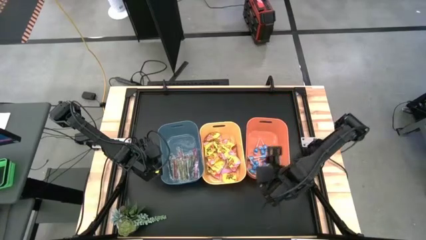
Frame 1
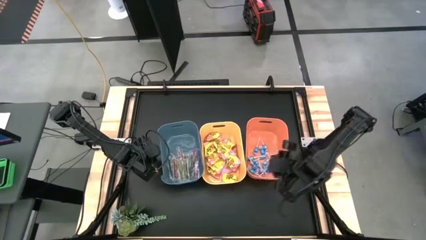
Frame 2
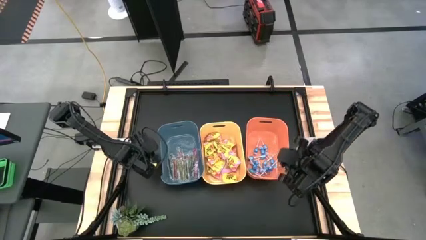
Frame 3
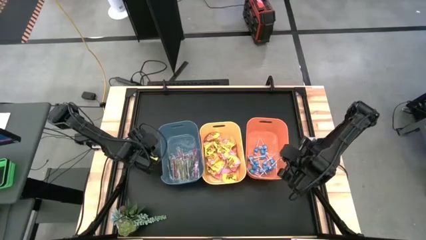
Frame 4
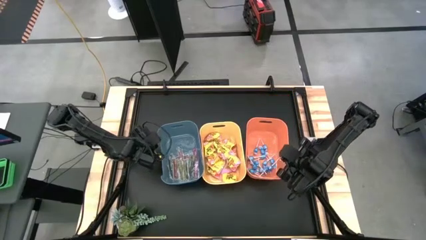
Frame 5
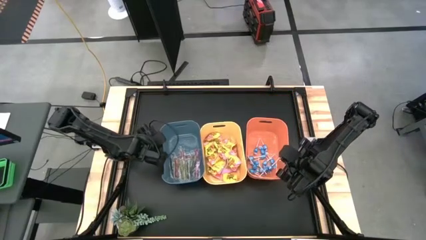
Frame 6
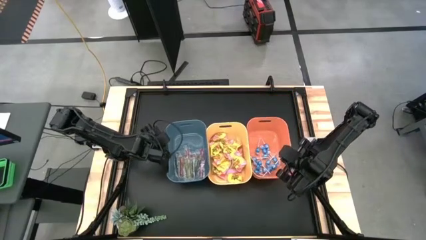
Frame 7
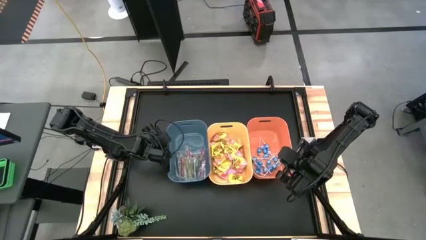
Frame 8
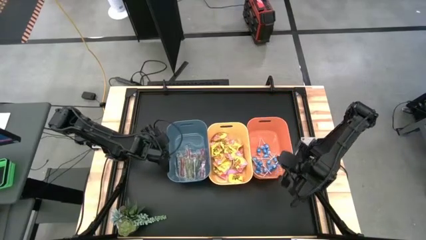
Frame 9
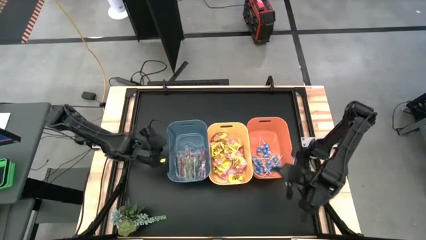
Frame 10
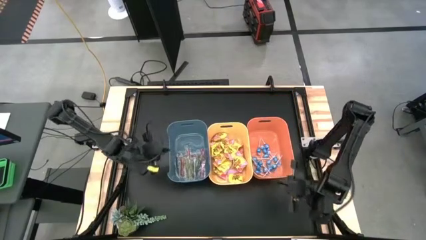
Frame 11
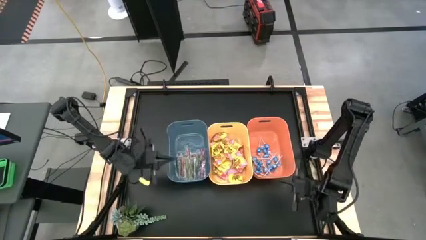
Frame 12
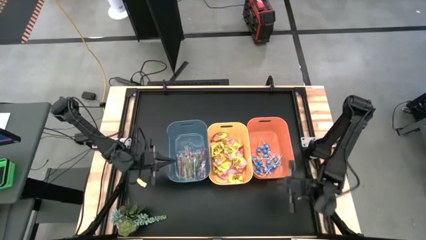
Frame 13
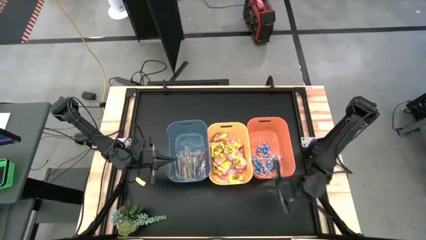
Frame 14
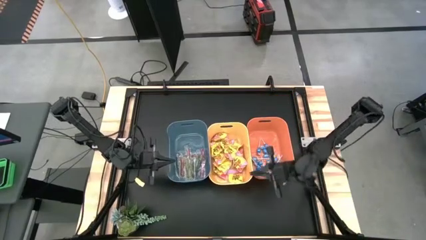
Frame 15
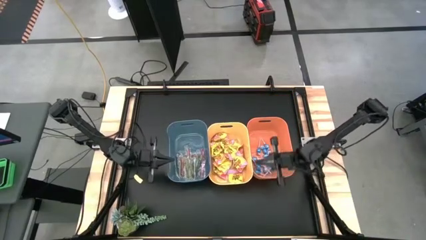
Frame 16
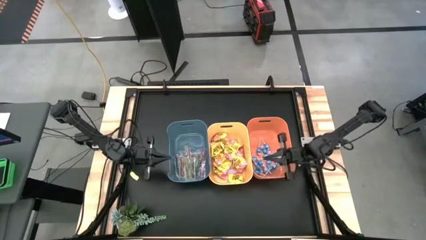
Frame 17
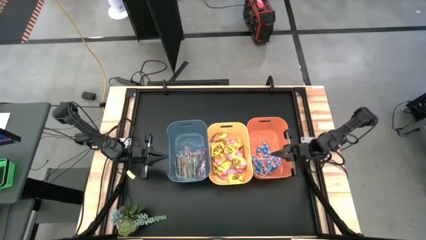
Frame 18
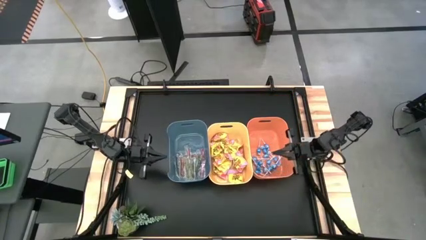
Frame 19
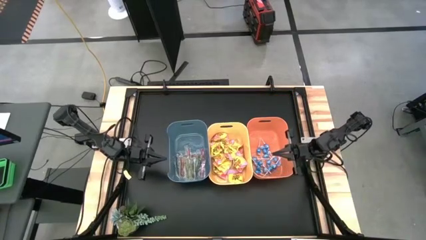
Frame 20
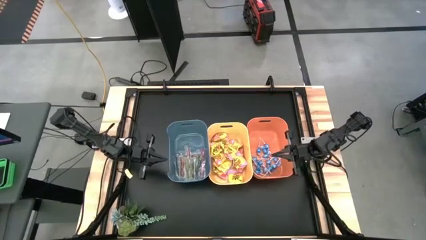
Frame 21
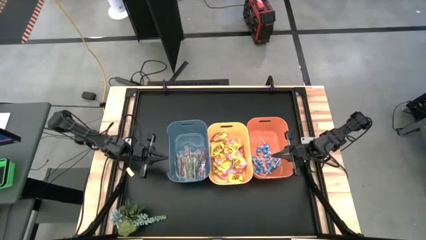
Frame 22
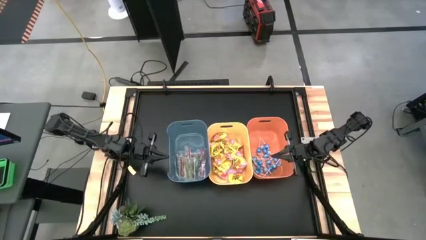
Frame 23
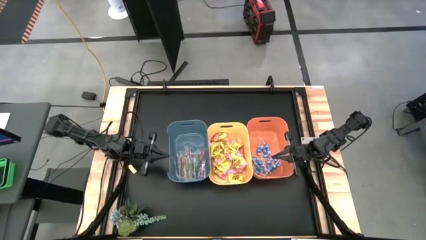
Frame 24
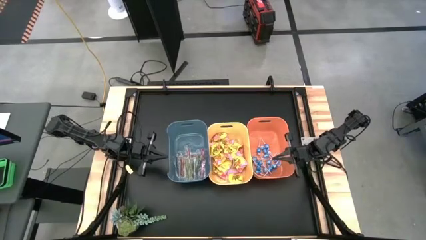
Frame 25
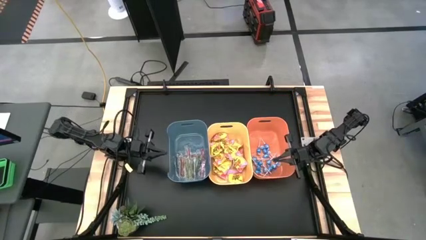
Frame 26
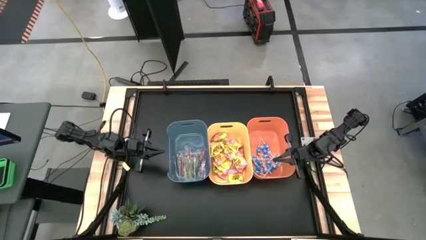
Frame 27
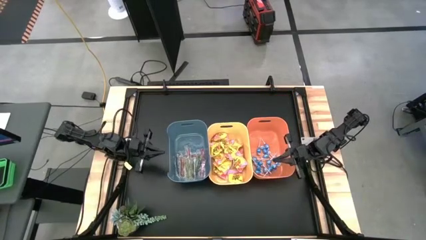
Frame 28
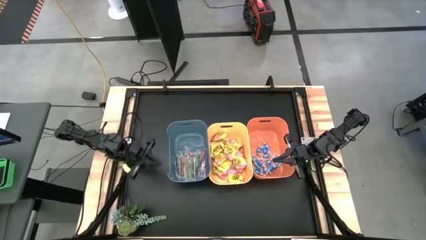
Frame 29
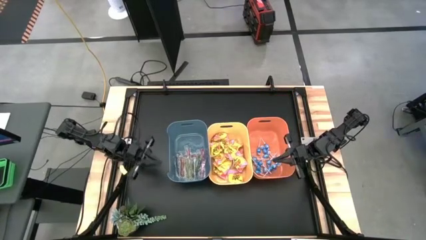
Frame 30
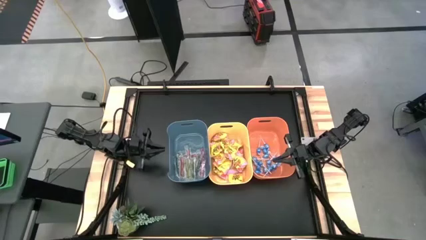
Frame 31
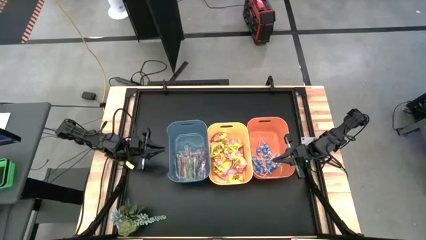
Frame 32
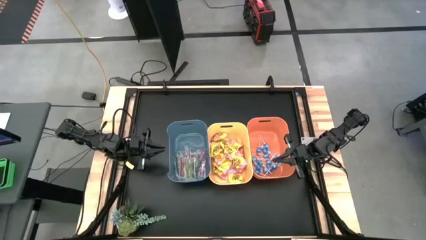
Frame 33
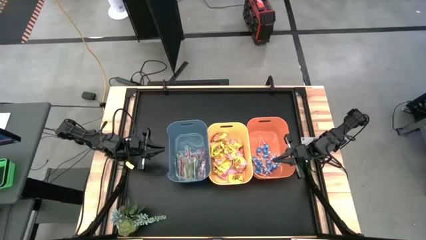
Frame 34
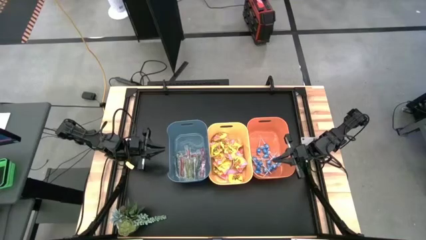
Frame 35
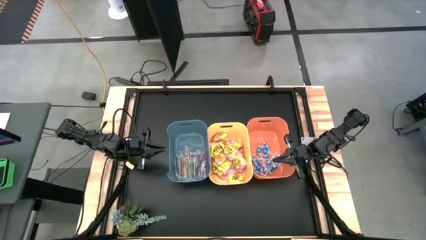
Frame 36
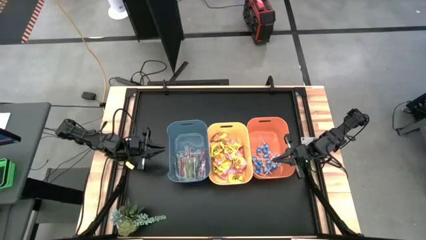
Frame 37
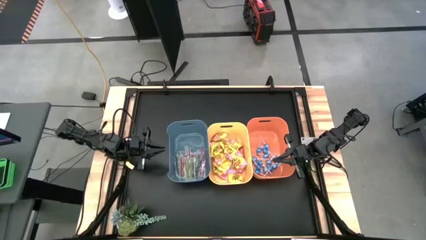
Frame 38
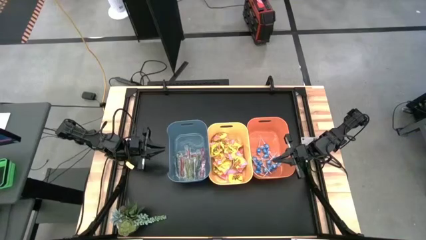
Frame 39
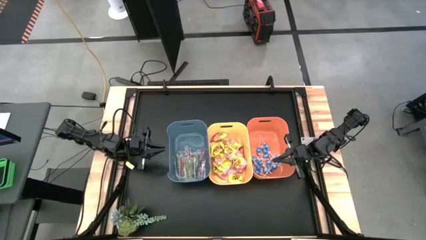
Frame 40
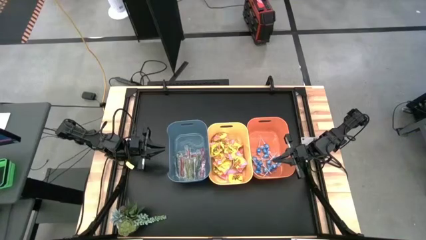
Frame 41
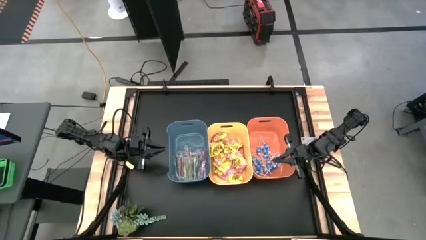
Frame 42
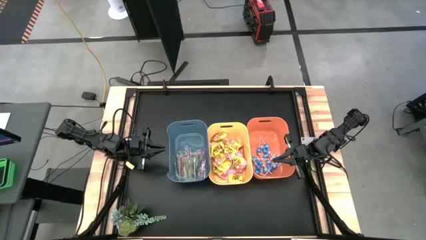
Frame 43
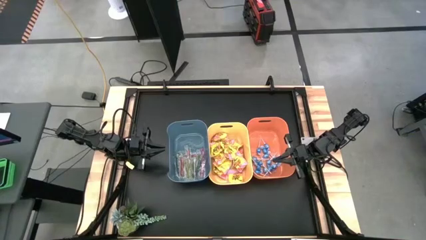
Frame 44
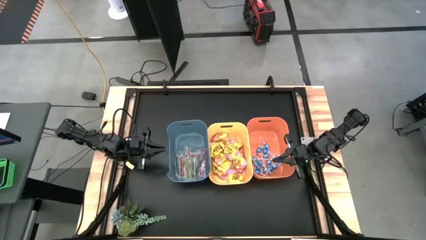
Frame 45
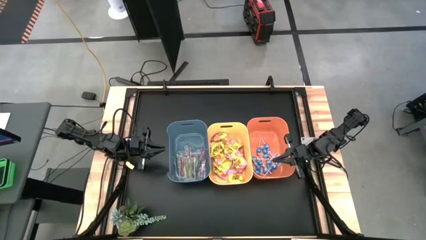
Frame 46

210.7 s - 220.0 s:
Task: Sort candy
Return to Home Position

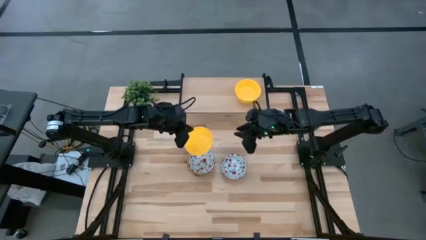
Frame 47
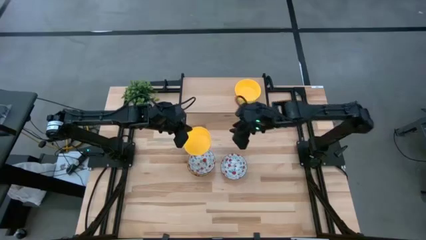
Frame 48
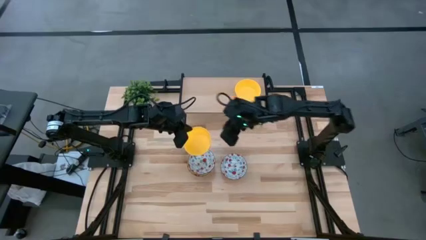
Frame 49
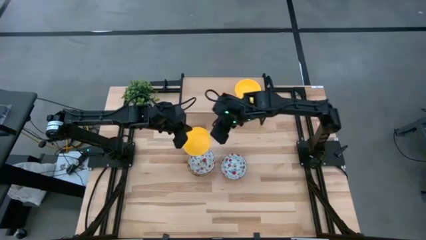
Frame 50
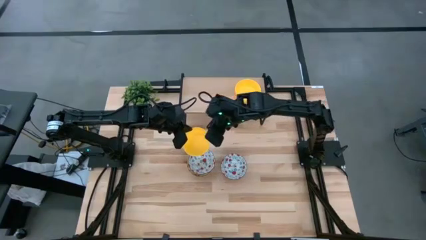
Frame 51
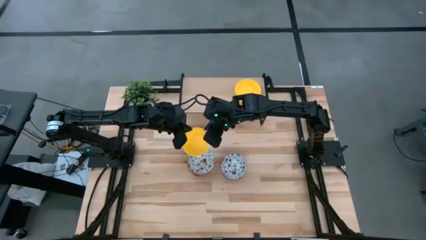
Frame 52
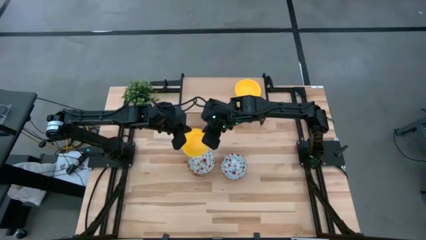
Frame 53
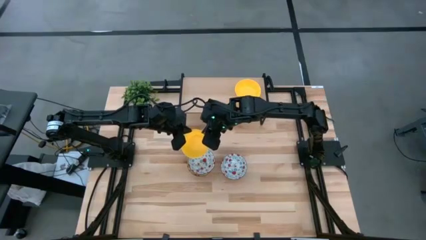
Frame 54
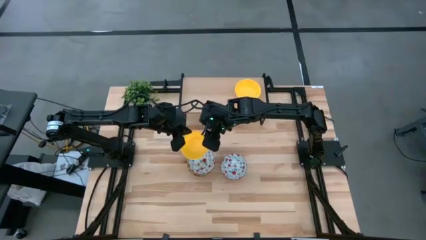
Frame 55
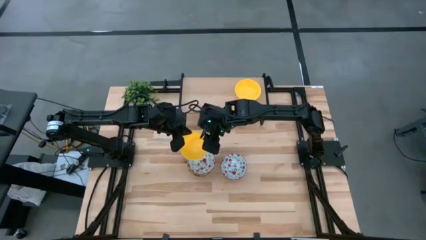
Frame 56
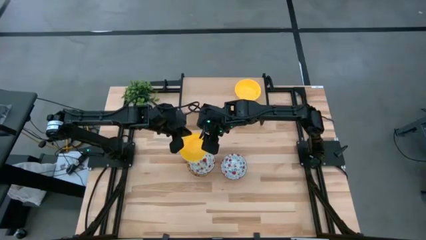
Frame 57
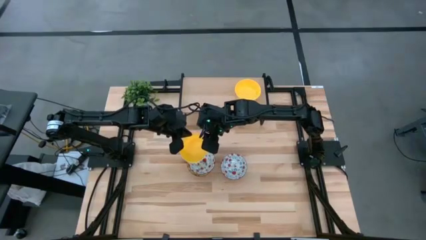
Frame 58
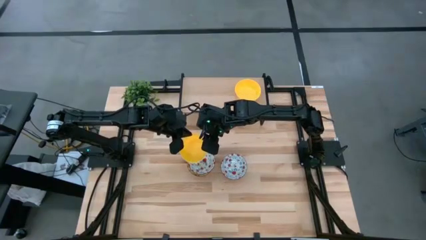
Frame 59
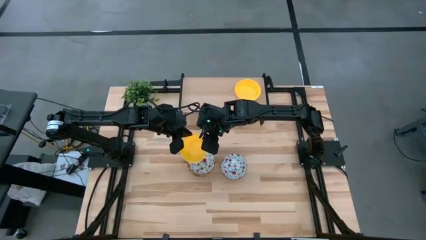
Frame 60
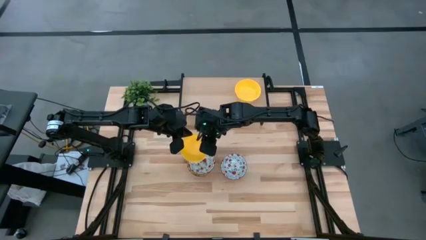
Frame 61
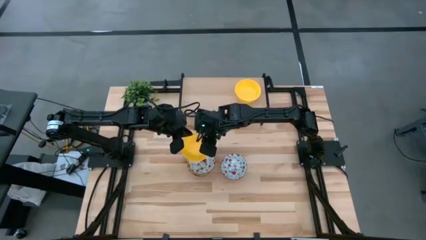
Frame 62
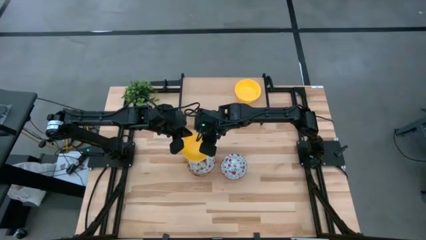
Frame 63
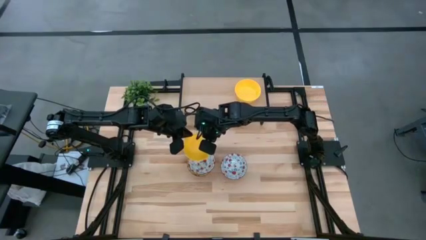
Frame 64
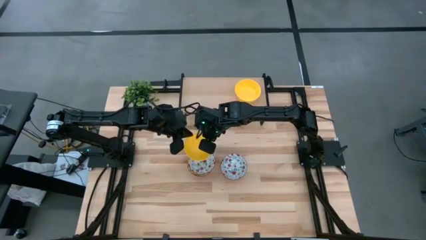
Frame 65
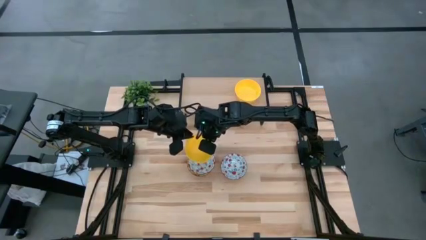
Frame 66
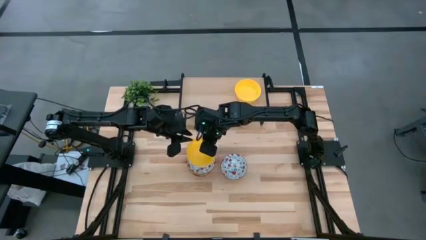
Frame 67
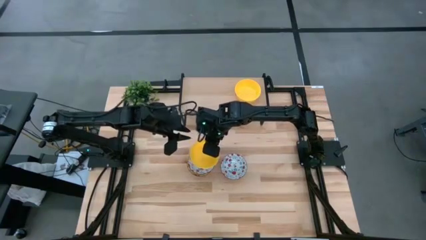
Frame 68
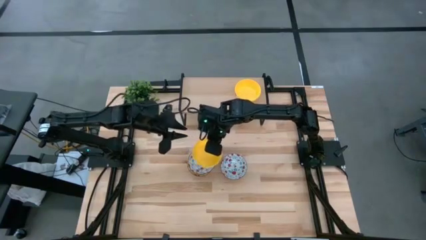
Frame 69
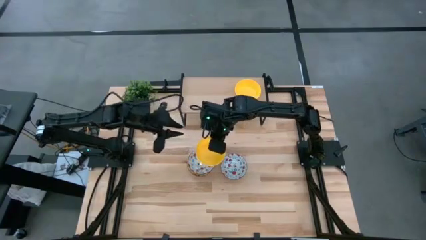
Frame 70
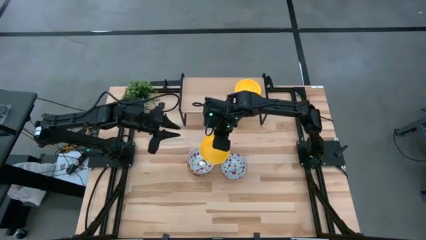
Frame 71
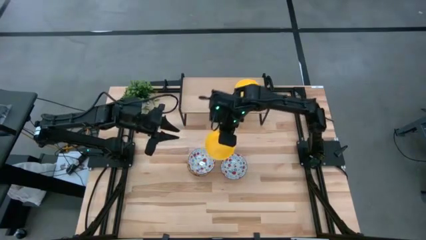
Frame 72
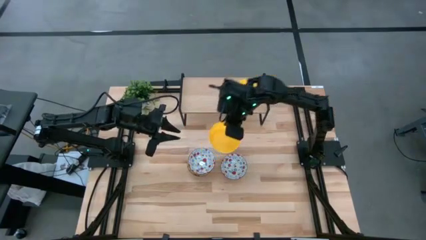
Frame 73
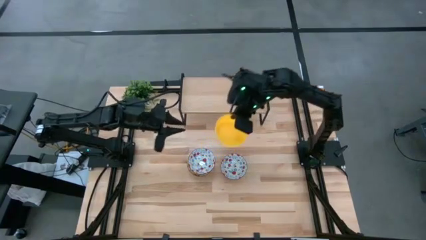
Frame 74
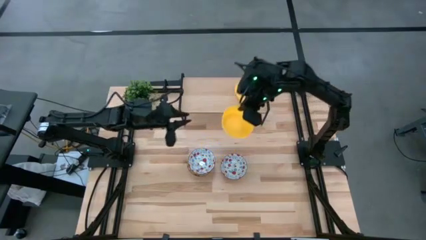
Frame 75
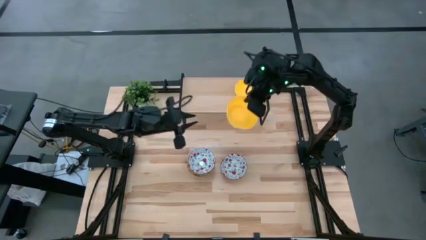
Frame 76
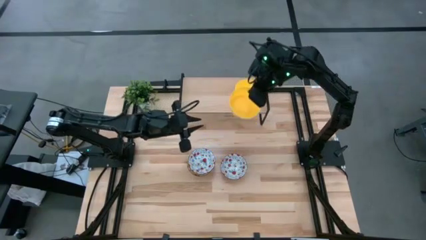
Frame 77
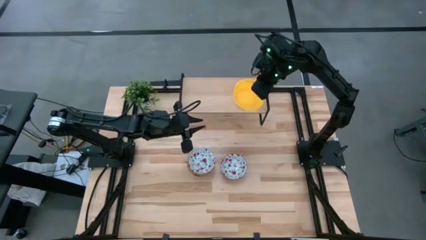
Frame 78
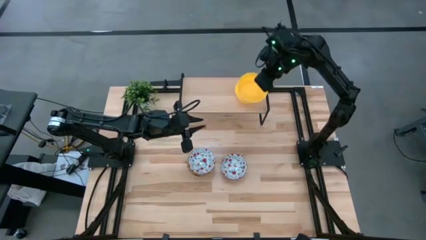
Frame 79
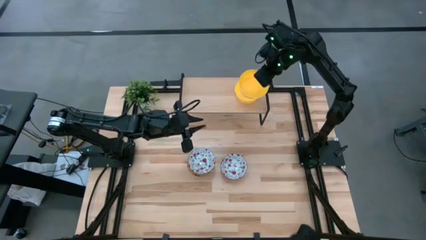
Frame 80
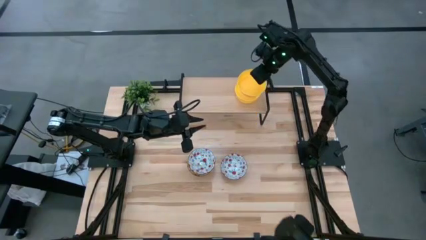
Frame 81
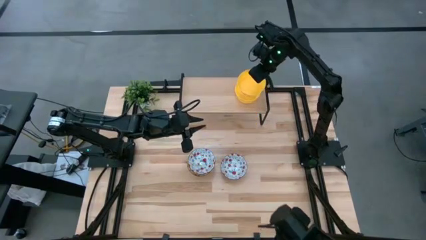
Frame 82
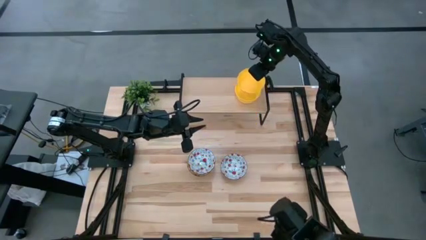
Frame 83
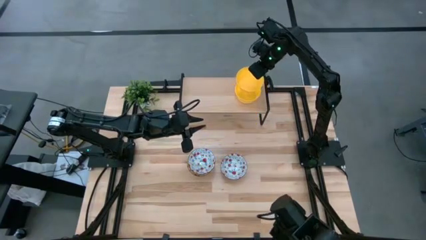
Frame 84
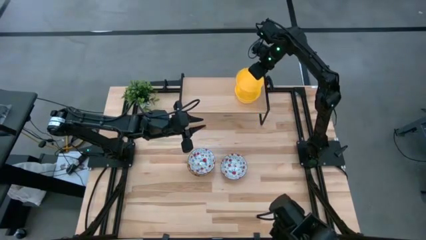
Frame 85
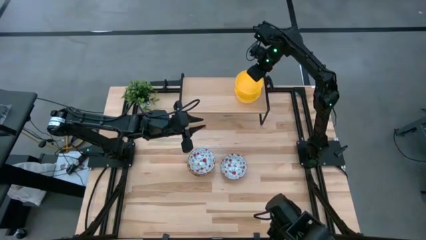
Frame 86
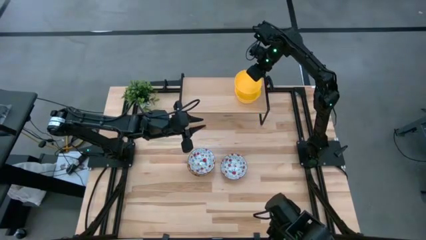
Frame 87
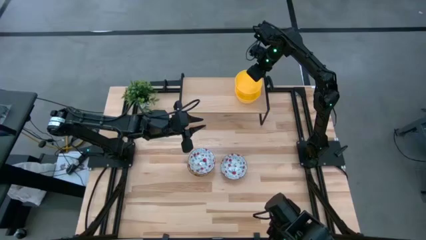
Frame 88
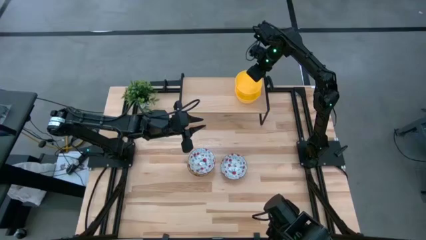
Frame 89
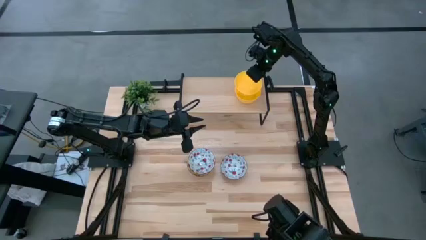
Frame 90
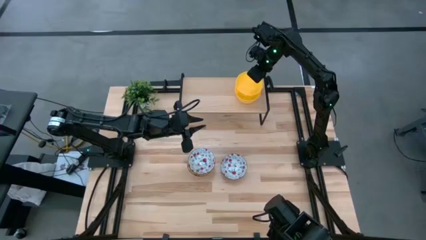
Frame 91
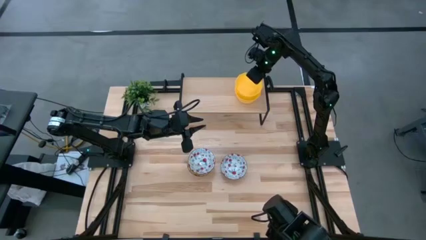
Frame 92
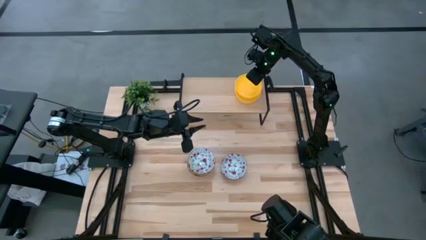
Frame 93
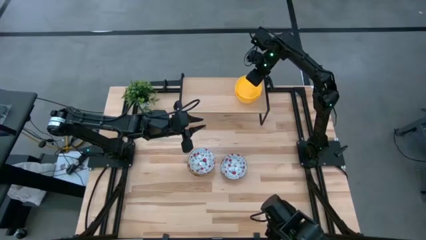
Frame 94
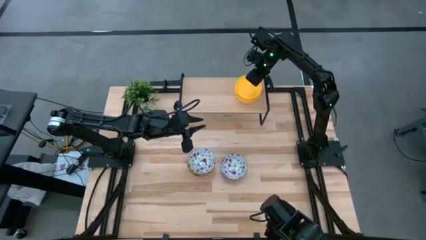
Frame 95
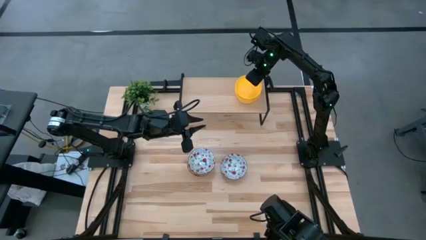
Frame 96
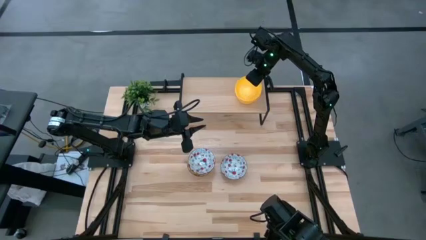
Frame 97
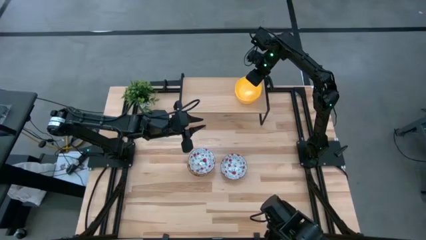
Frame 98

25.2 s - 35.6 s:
Task: Pick & Place Mini bowls
Stack the top left yellow bowl on the other yellow bowl on the shelf
